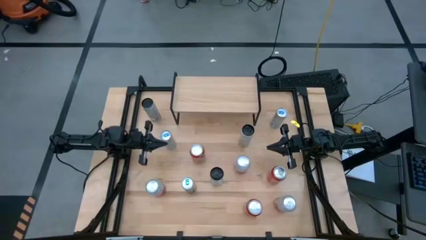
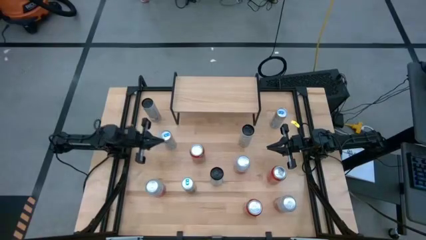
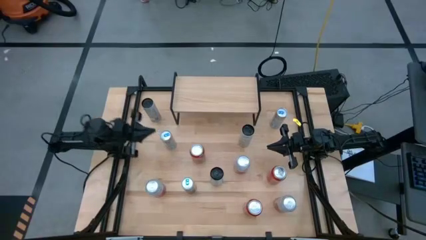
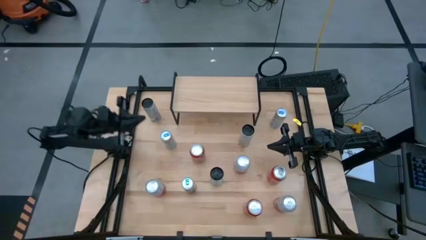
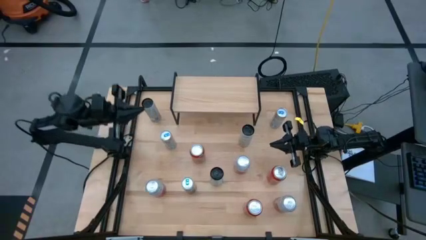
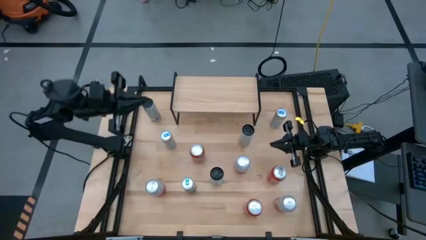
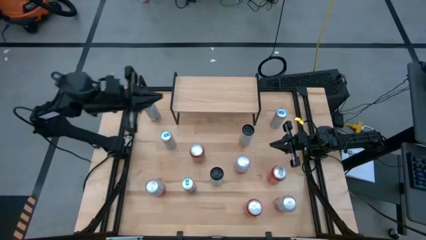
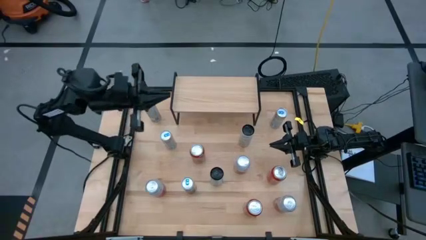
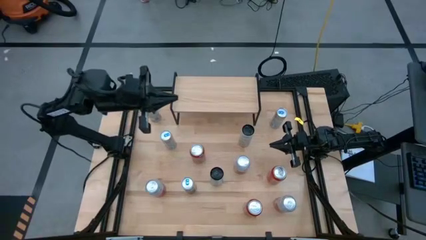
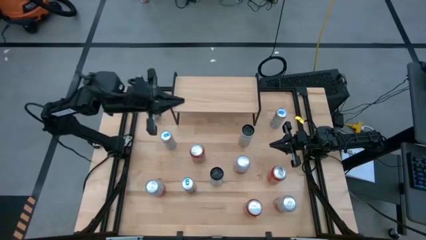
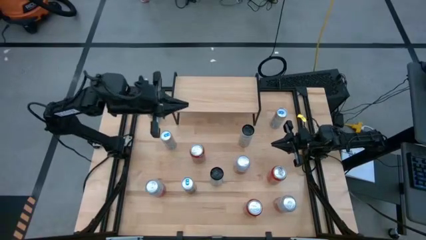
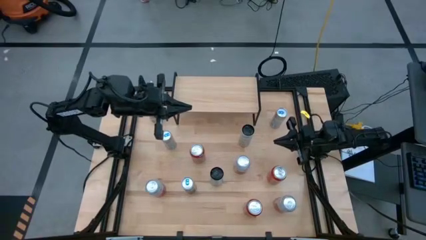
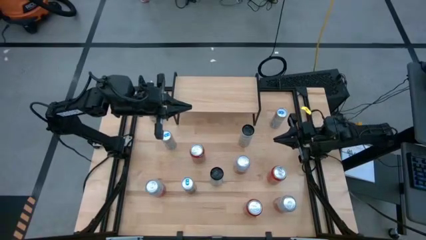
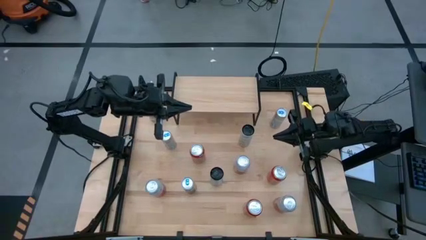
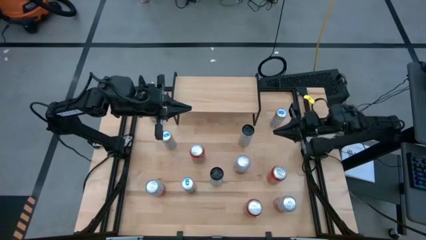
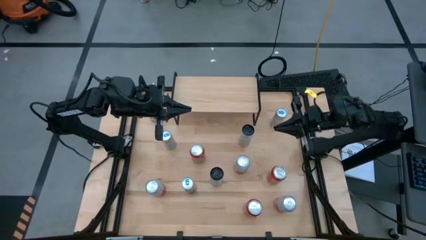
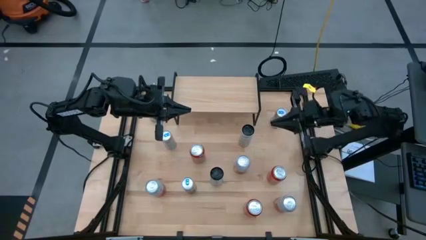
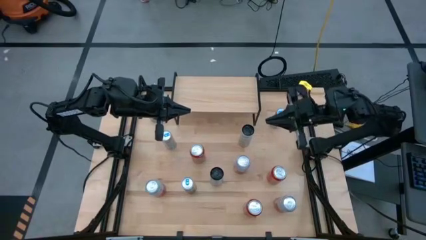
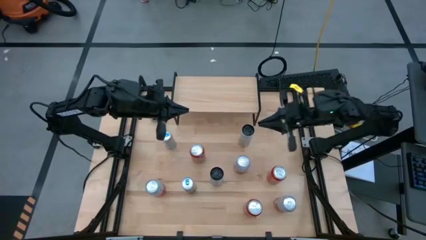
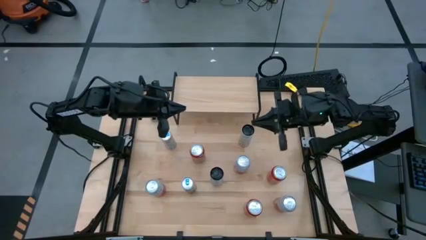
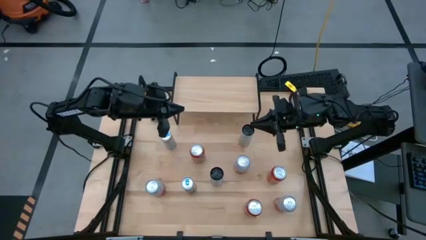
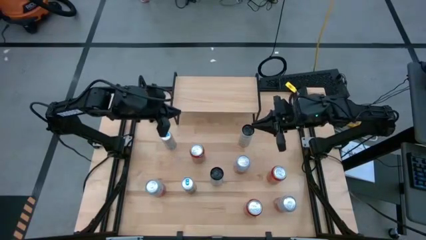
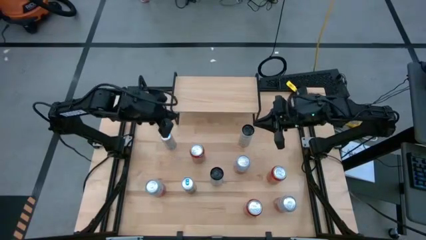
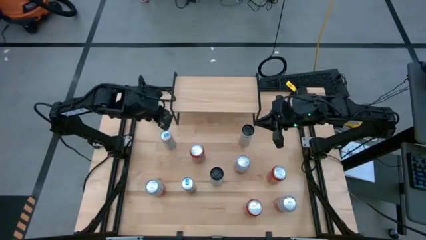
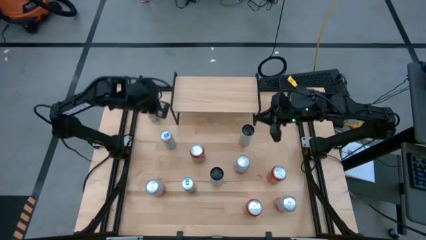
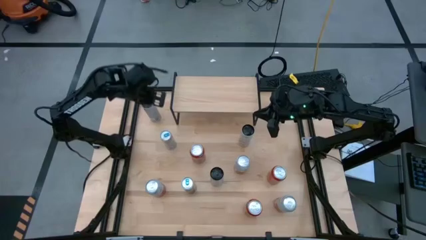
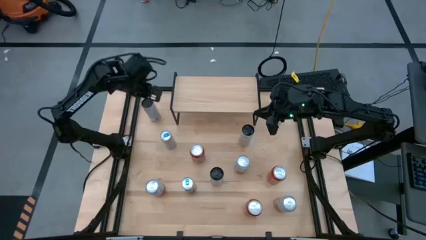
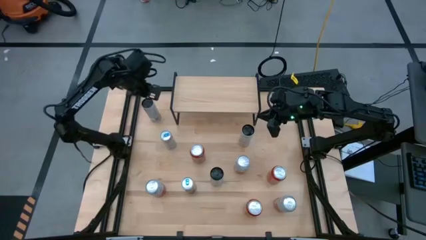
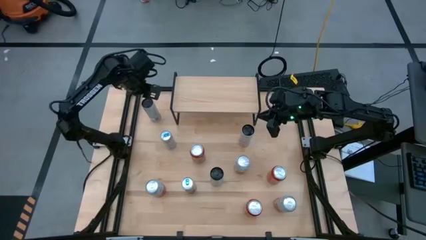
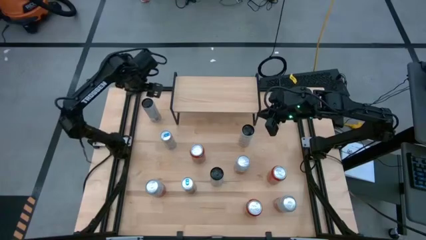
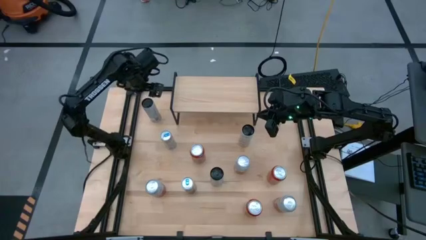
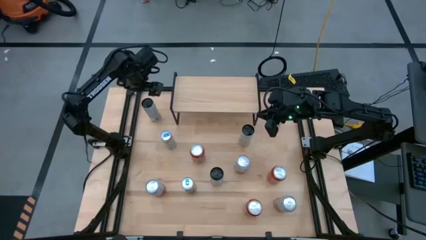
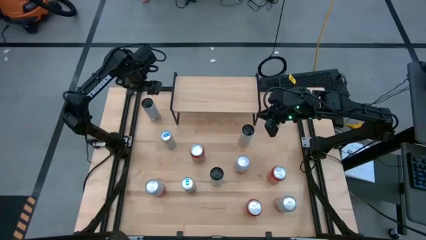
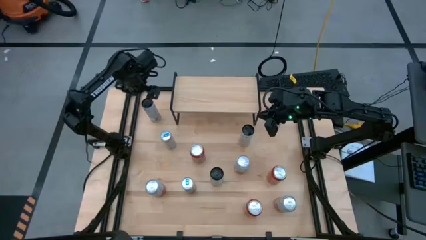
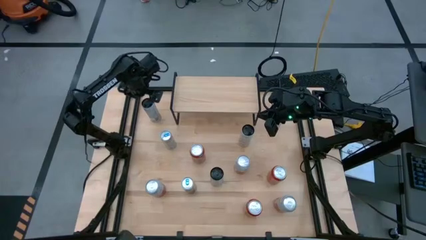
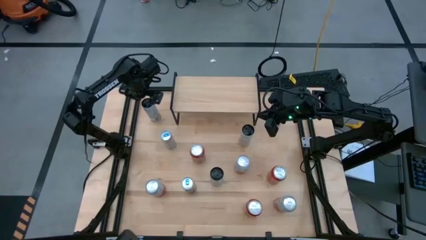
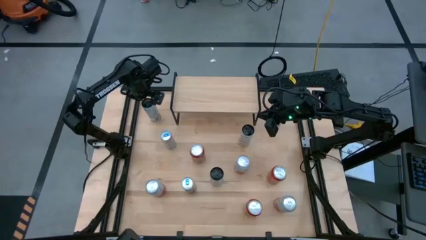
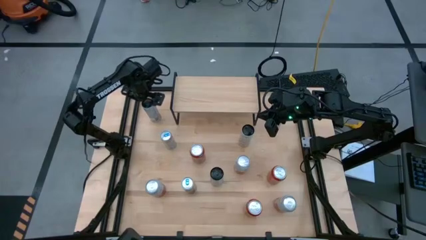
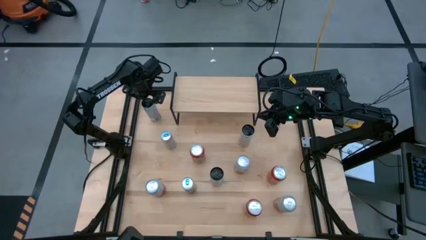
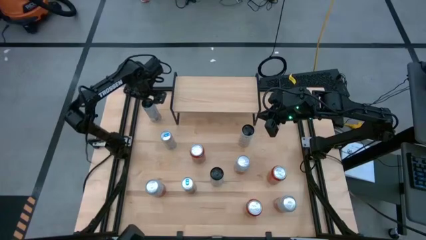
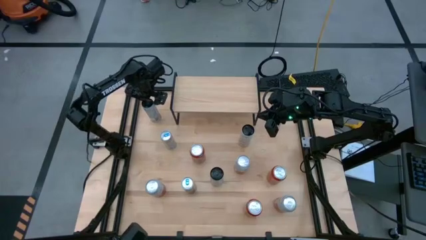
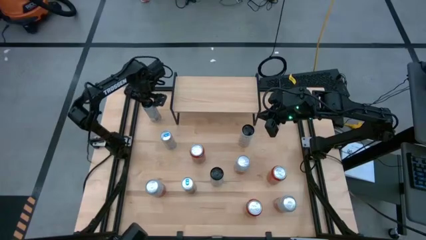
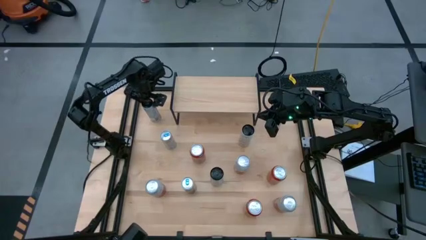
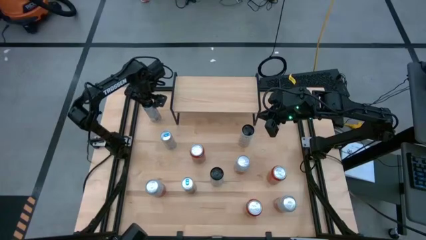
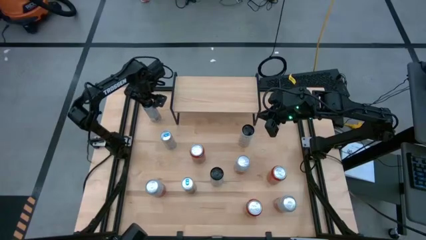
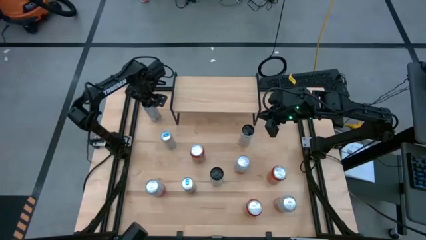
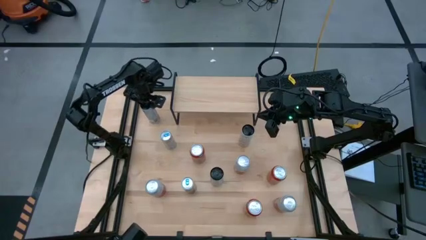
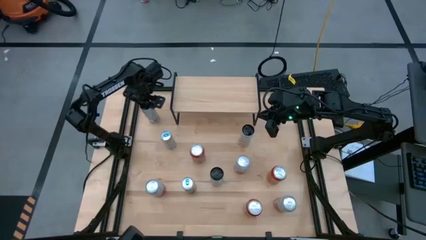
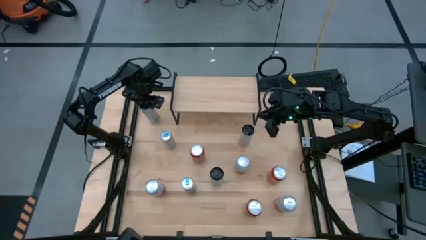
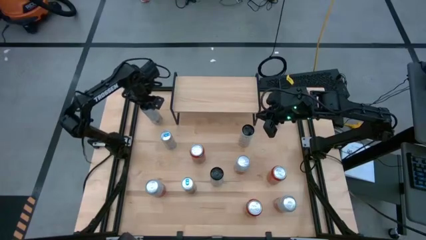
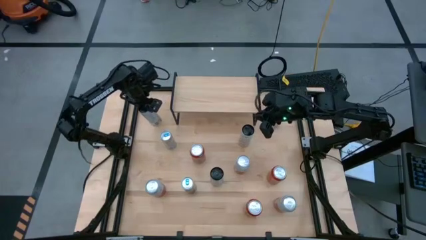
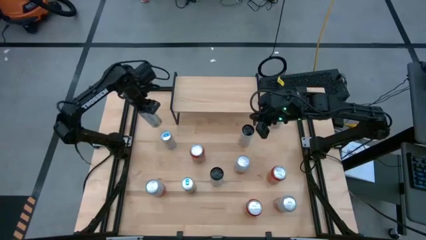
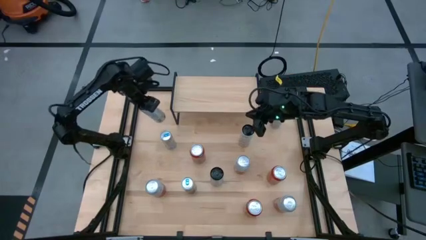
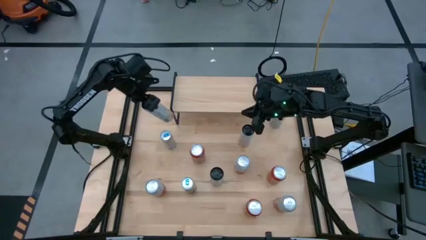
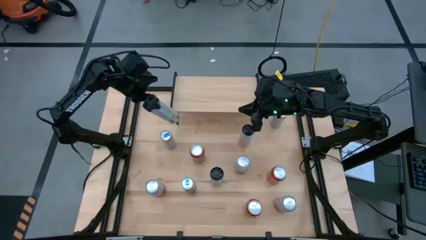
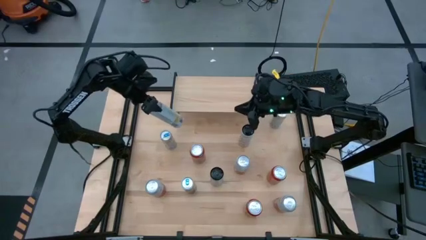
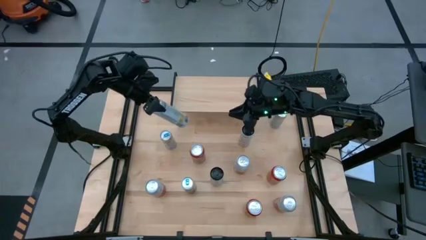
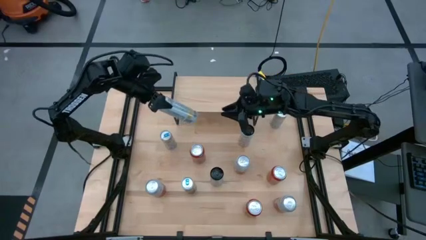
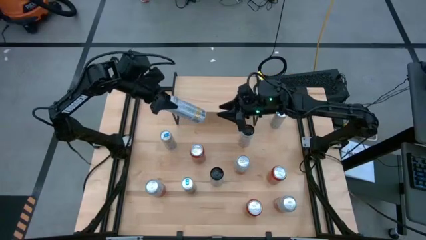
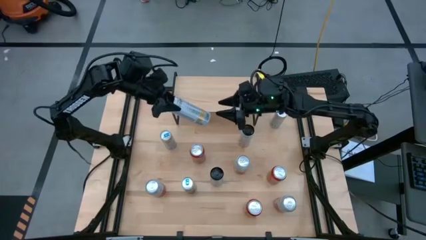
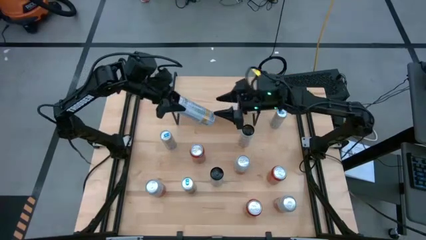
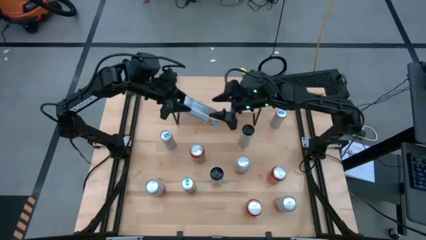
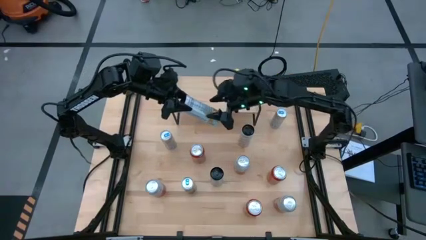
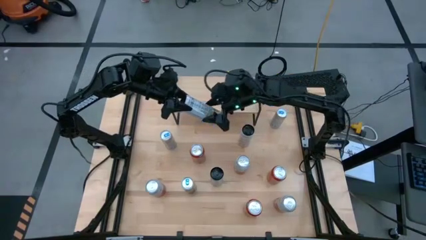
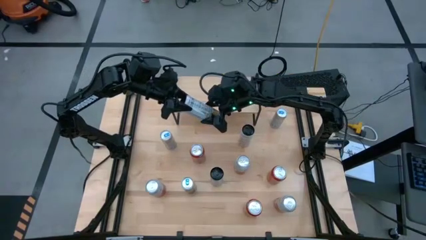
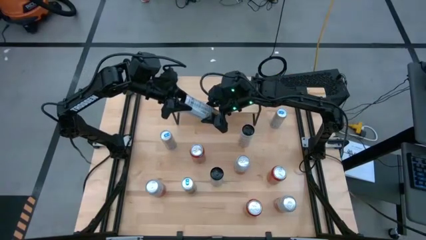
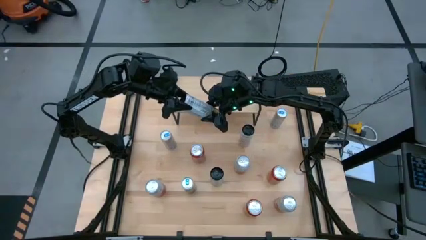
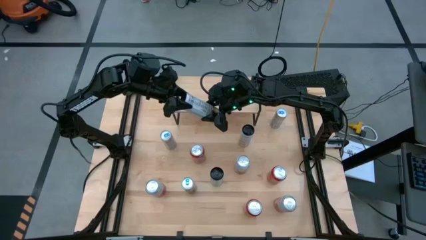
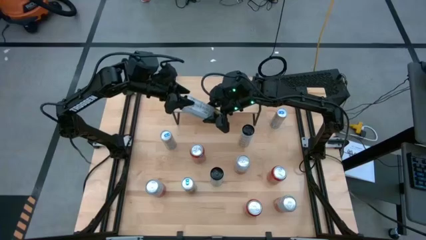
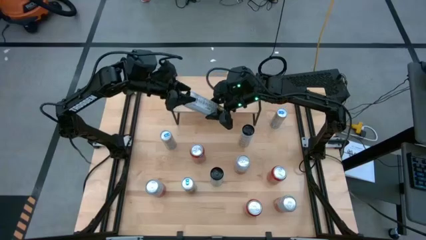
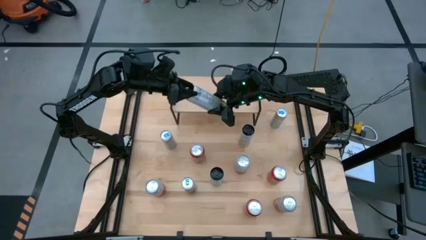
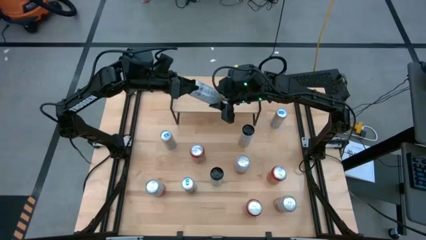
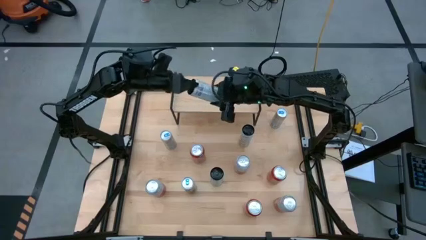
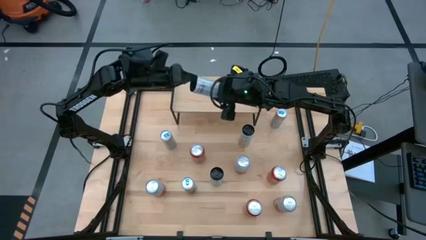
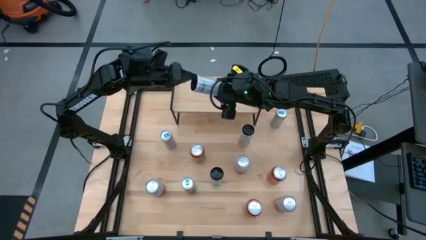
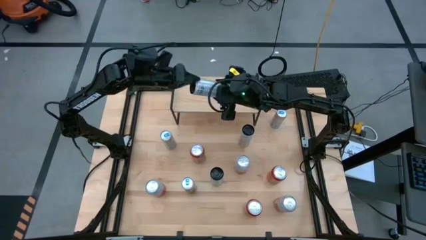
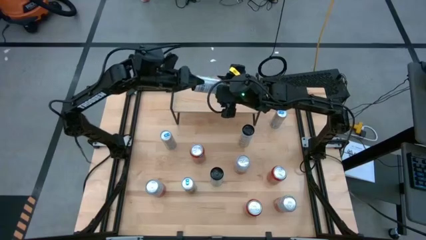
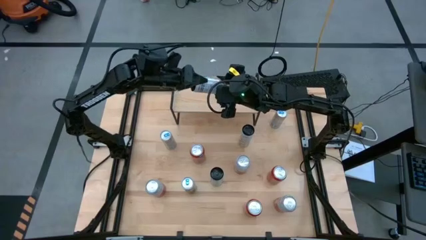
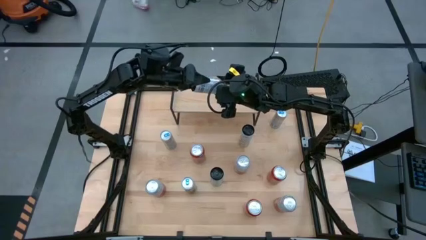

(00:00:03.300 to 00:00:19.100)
Task: Place canned beverage on shelf
Put the top left white-yellow soda can on the shelf
